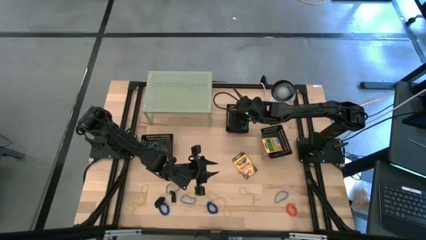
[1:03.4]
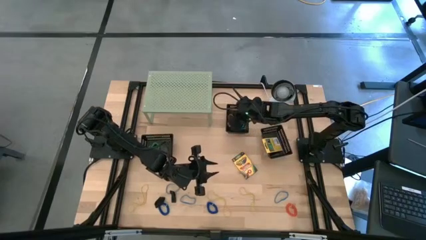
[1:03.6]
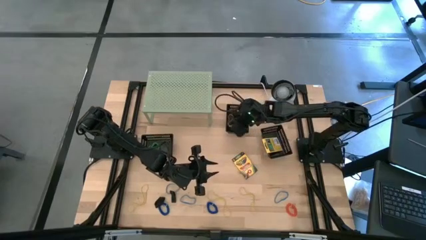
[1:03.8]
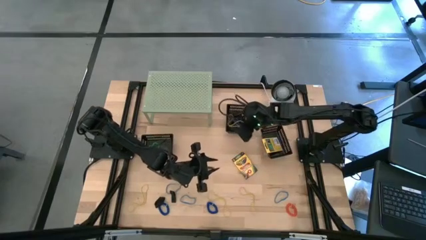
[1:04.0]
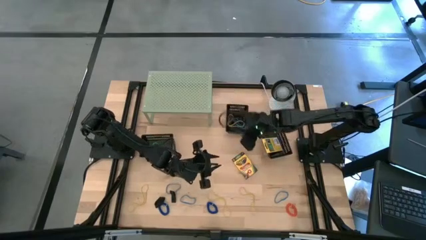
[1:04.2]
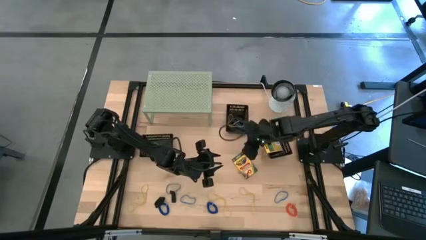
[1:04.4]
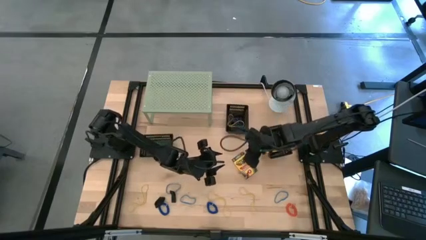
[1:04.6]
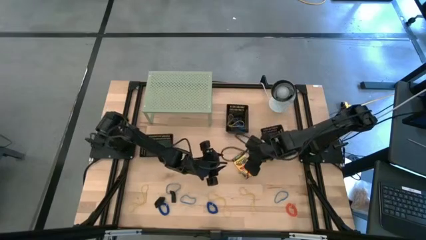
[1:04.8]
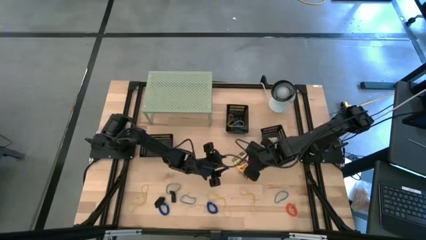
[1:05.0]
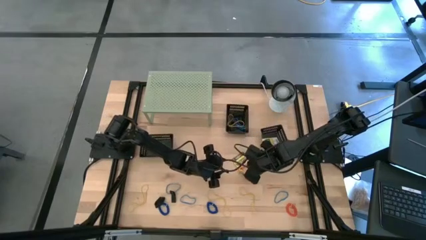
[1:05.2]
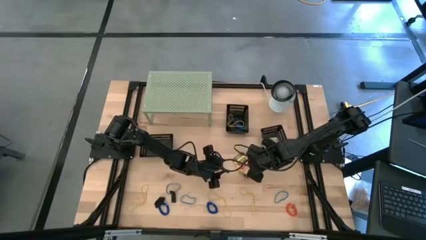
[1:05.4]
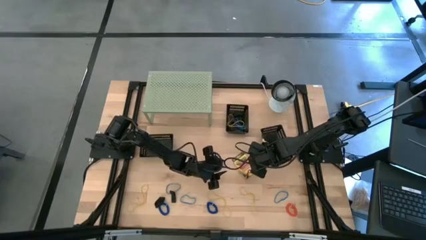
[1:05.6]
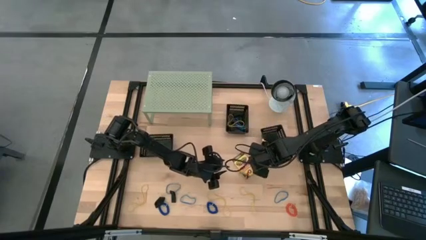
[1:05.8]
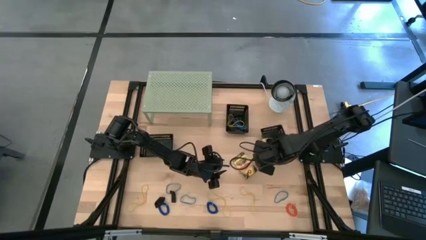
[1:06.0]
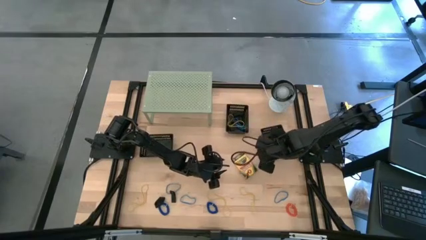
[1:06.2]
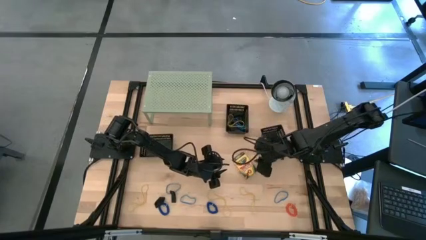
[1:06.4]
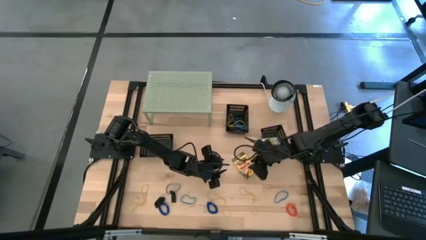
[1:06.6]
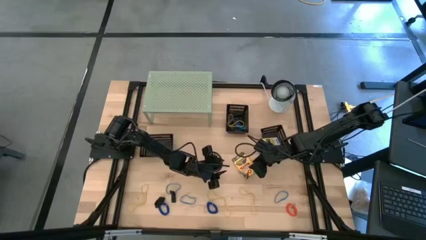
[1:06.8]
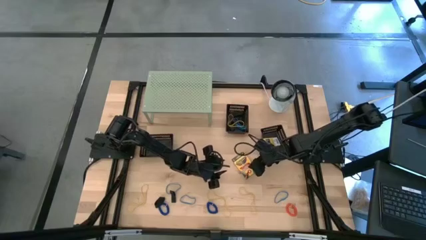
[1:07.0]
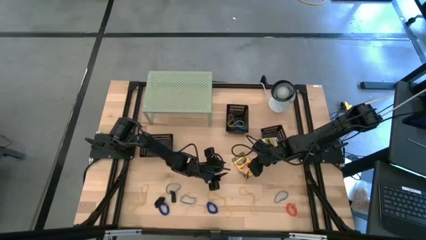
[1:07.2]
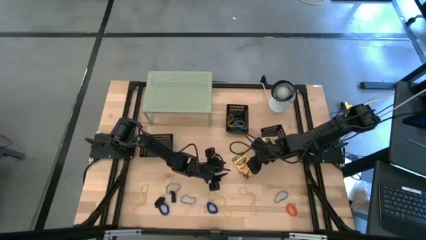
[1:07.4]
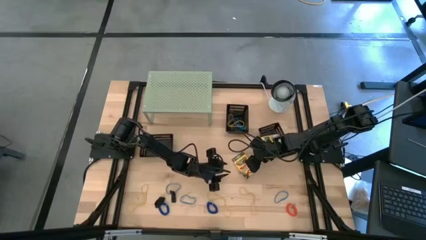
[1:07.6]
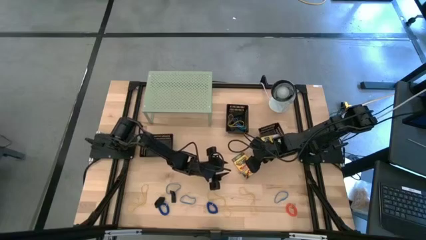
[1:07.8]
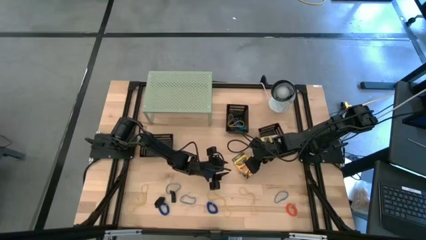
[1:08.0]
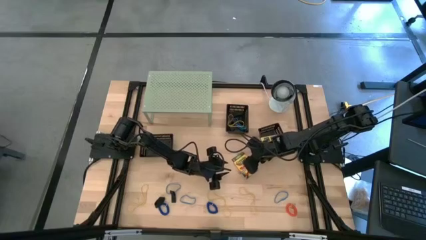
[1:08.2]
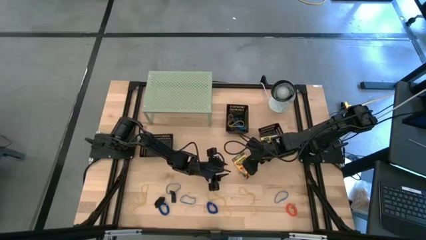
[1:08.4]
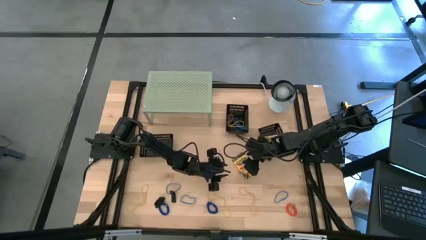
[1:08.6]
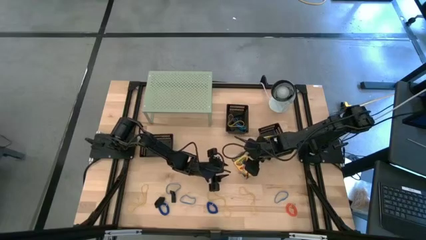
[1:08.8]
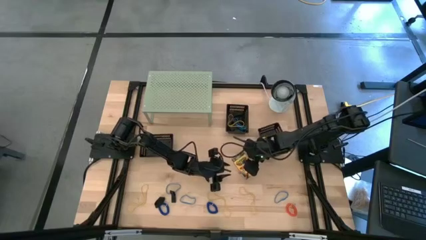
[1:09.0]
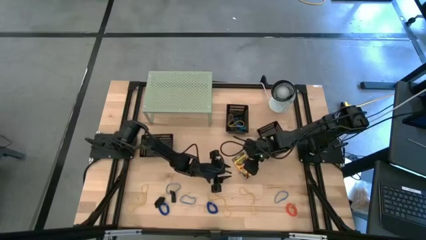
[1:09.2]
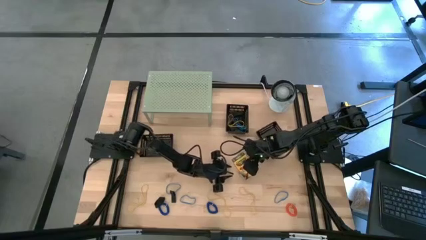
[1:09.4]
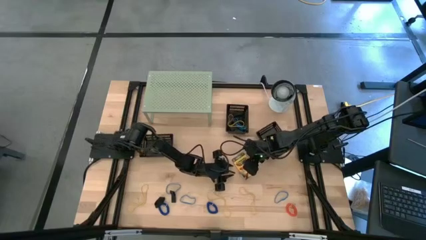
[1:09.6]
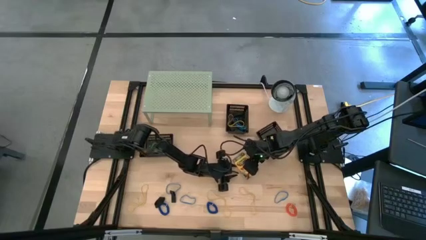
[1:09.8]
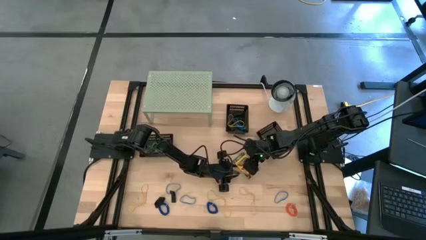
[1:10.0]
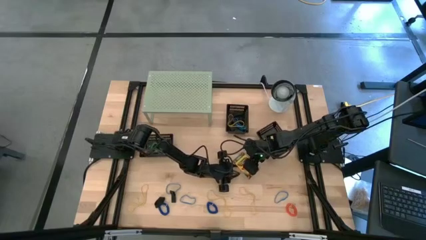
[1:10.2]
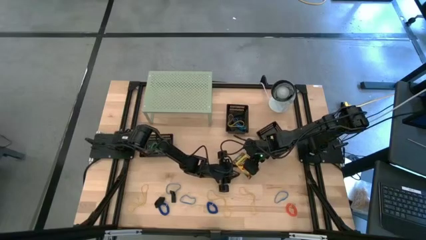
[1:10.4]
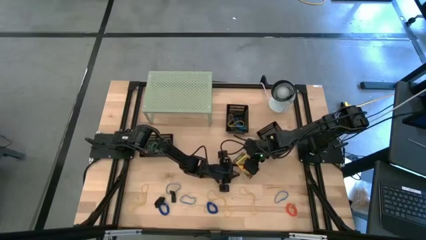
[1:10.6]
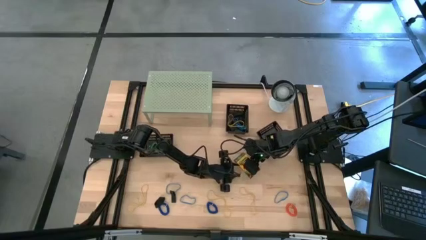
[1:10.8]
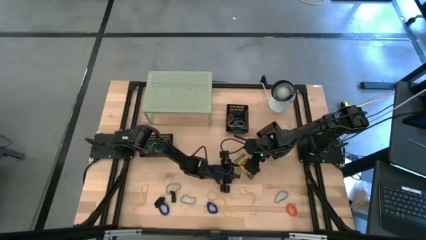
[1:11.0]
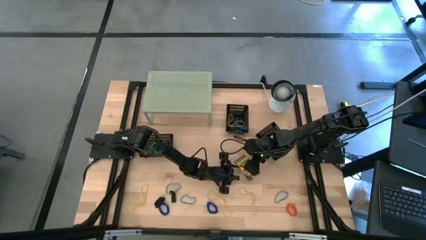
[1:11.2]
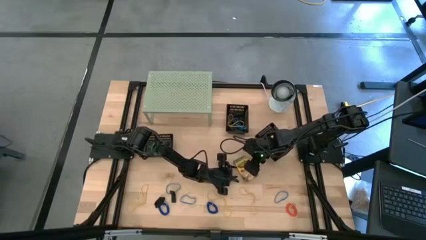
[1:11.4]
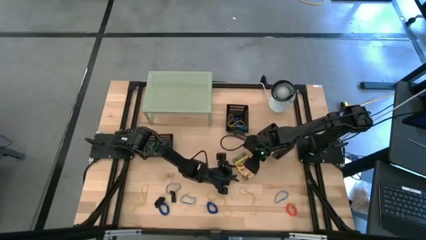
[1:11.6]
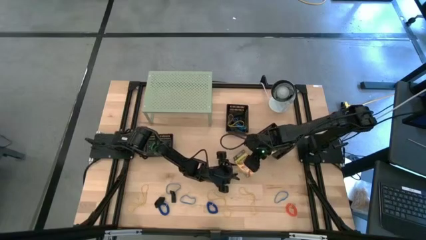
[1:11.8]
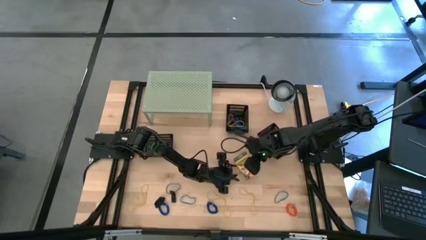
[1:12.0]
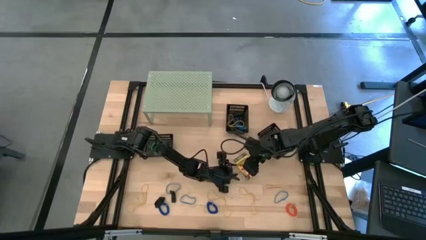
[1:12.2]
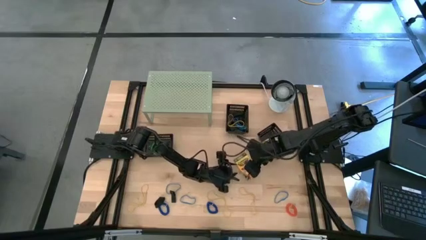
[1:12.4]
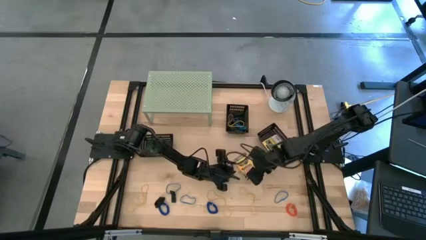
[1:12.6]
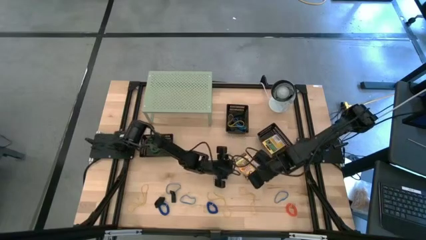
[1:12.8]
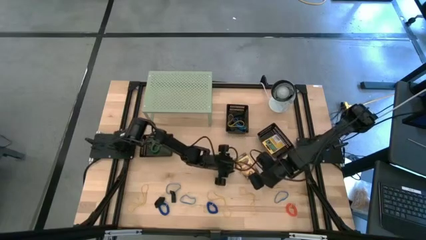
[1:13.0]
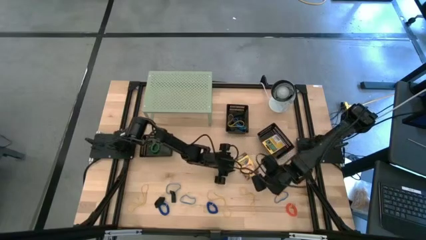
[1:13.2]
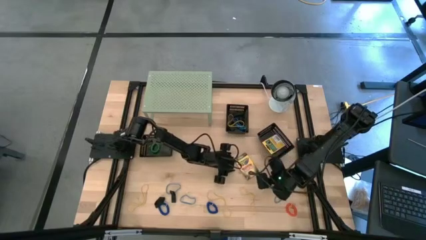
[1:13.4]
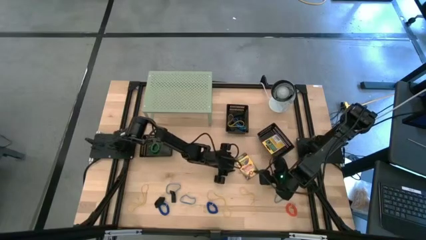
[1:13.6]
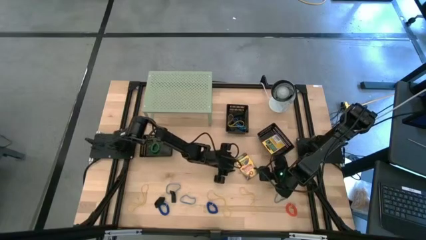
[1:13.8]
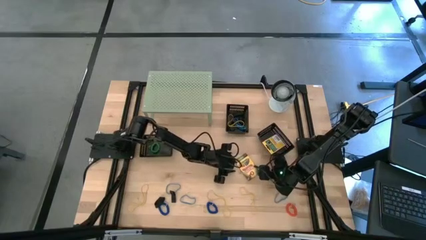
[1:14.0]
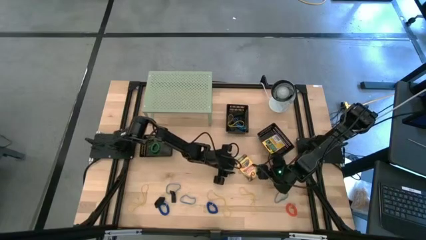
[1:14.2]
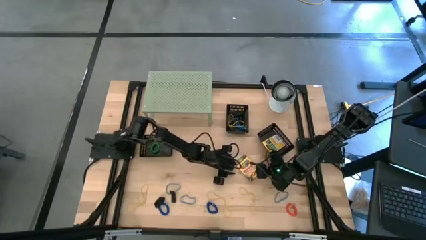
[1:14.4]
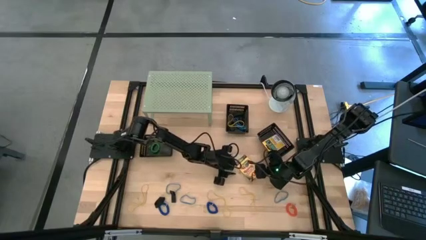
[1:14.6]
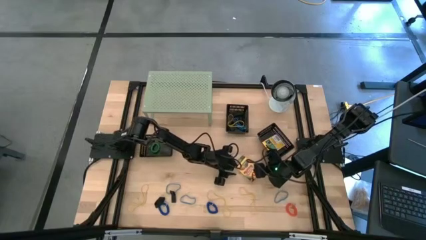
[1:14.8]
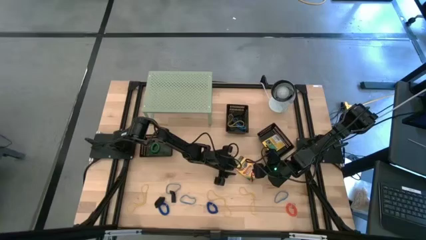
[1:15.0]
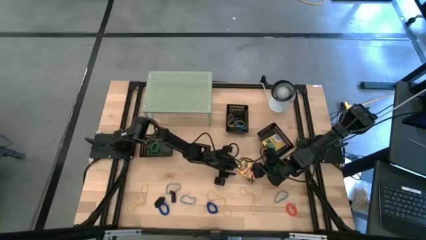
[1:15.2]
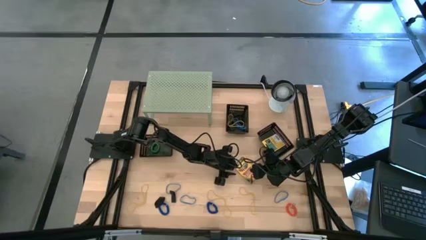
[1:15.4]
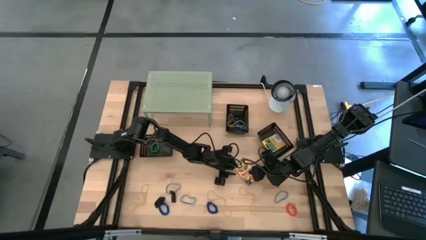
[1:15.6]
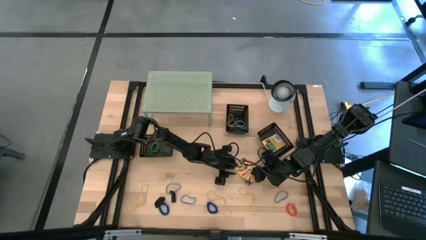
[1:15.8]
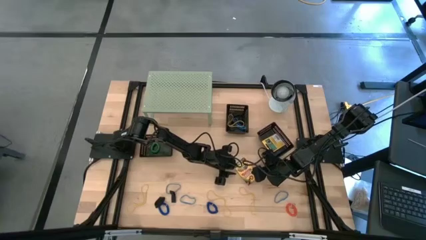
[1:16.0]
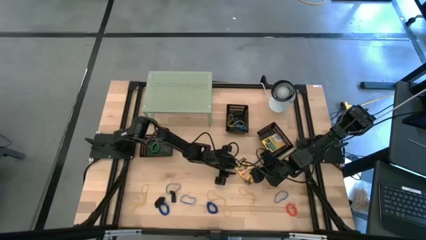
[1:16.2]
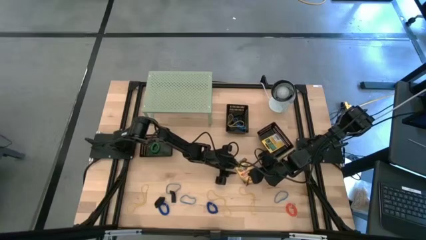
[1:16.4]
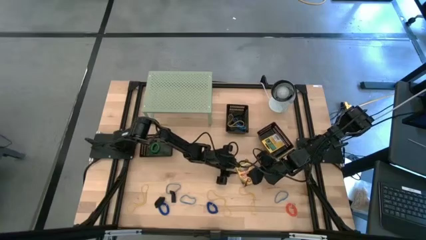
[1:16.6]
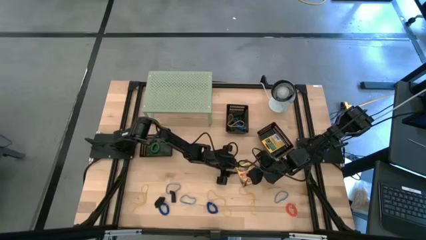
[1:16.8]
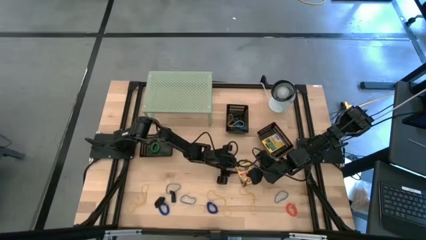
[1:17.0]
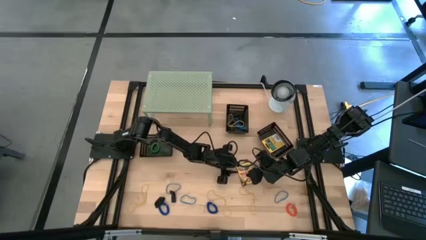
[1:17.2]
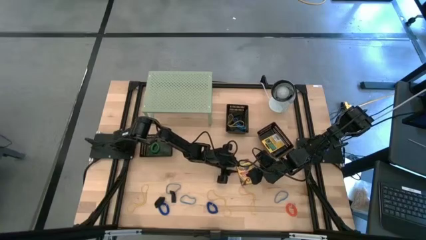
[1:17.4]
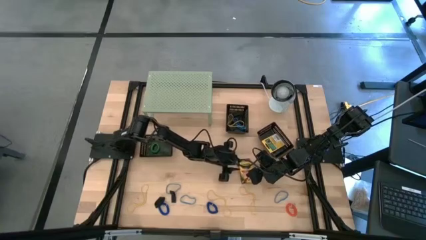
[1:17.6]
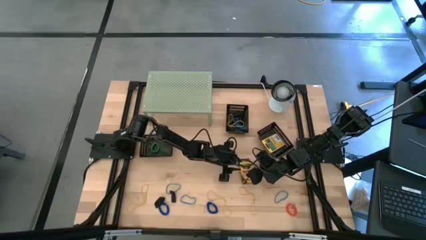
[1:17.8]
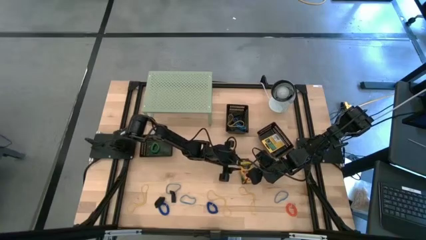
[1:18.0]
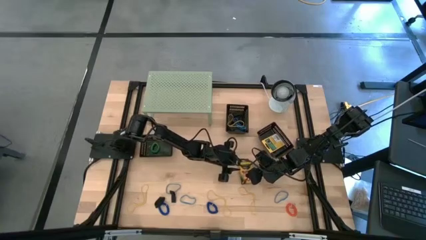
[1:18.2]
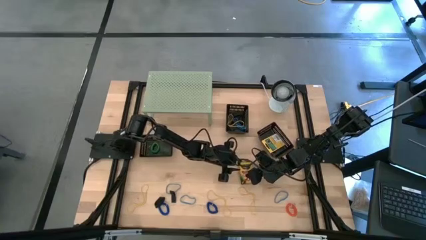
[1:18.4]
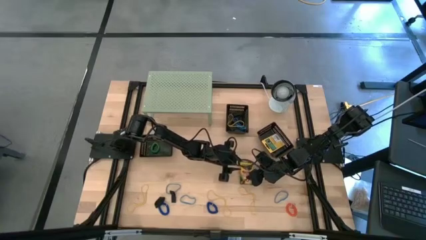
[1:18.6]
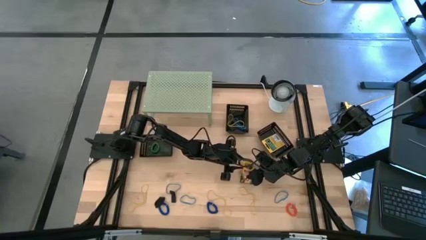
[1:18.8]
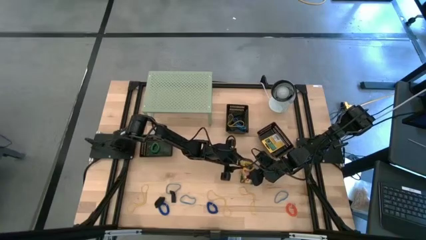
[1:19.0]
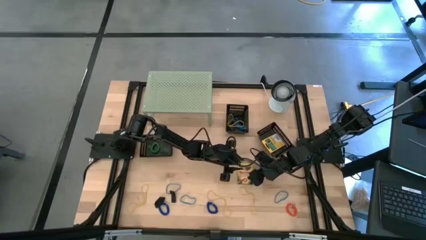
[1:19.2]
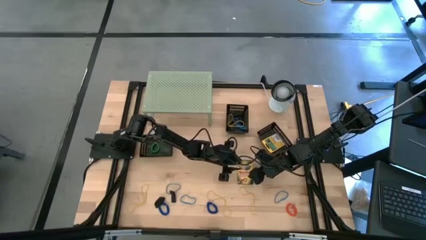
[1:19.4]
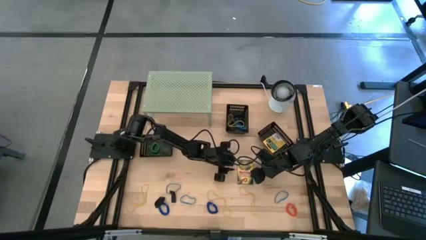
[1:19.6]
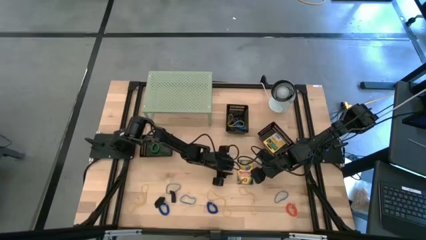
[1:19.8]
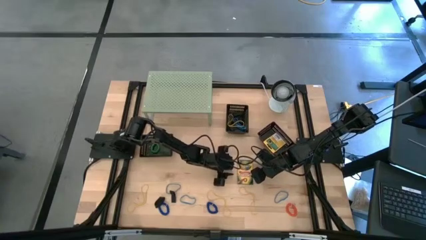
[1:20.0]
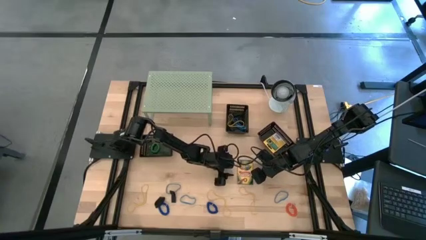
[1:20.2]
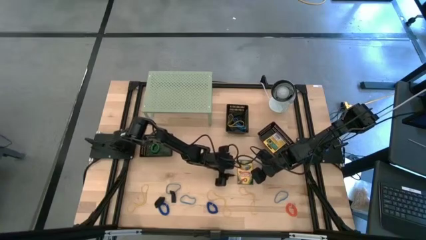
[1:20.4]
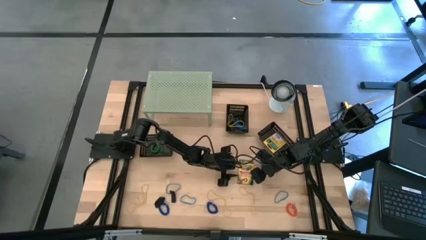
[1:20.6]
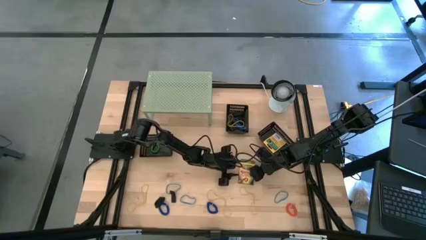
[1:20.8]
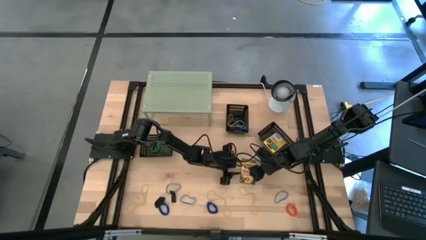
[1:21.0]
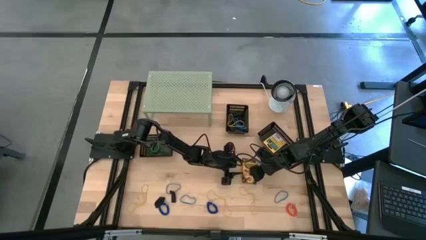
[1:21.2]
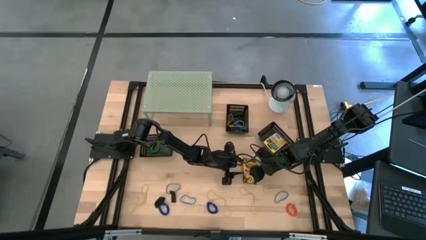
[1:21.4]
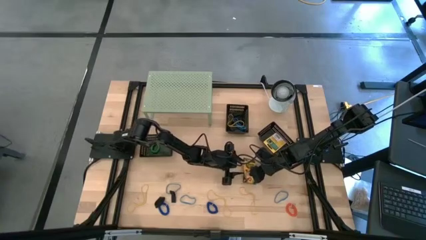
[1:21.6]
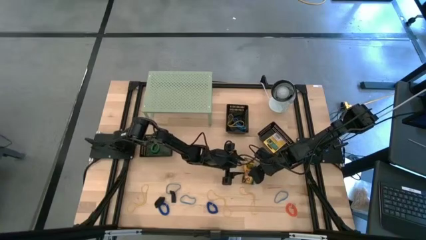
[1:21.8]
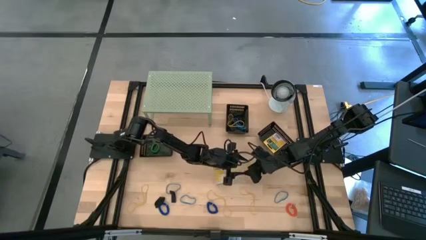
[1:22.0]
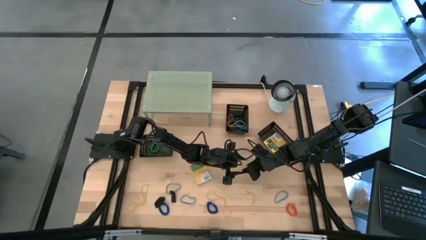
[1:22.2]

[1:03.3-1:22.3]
Task: Pick & Place Office Desk Supplies
Put the yellow crayon box into the right black bin
